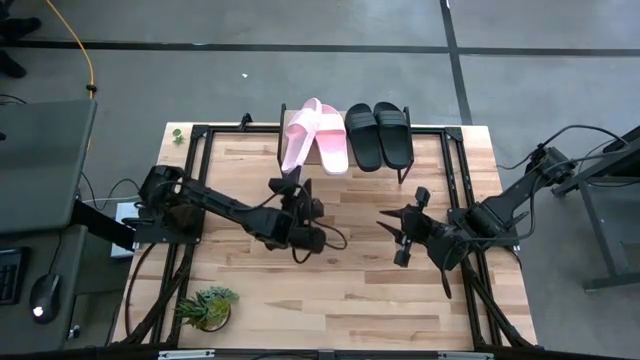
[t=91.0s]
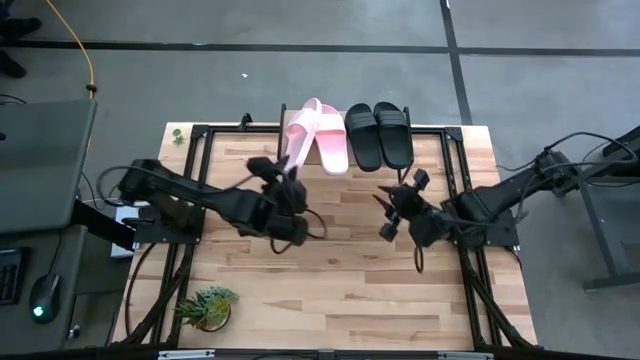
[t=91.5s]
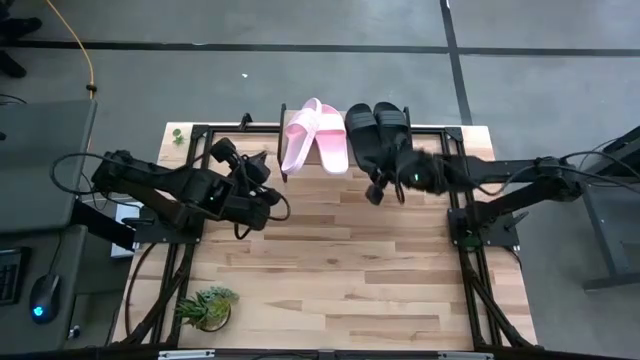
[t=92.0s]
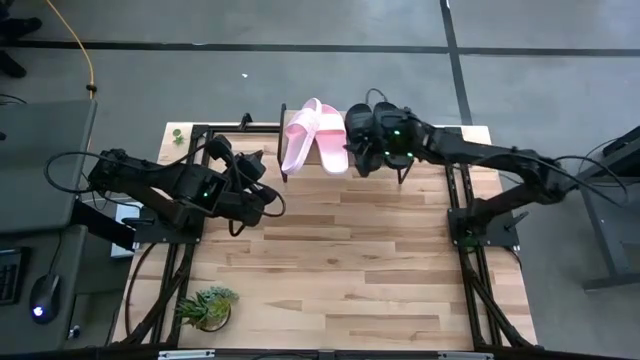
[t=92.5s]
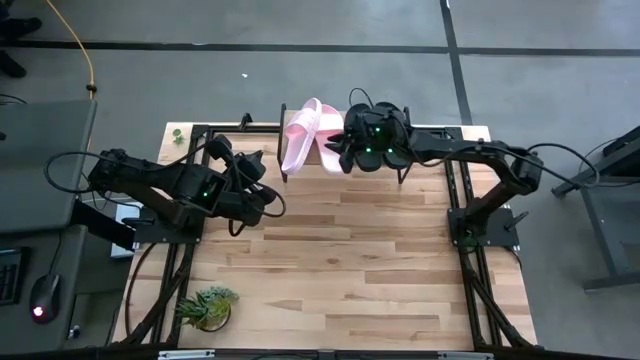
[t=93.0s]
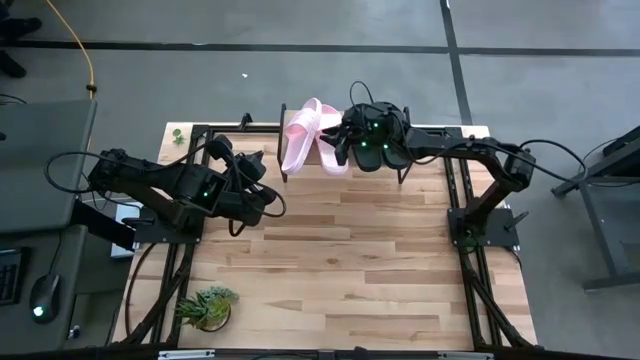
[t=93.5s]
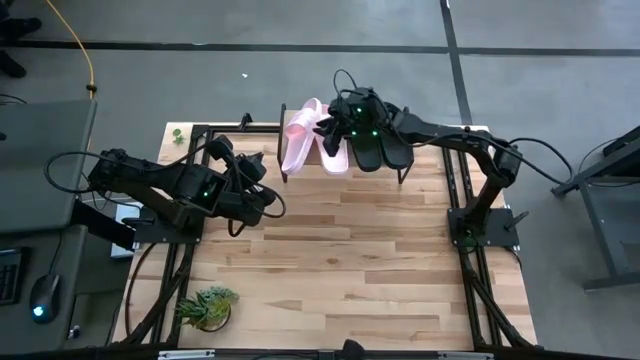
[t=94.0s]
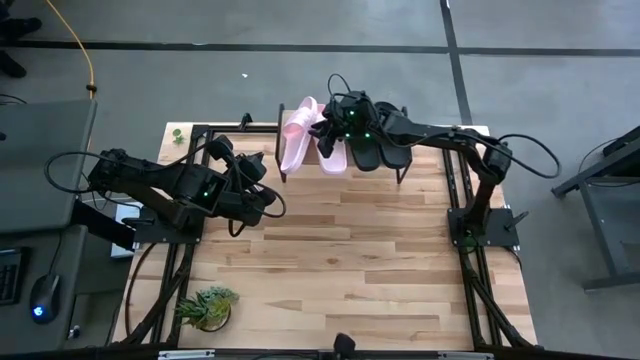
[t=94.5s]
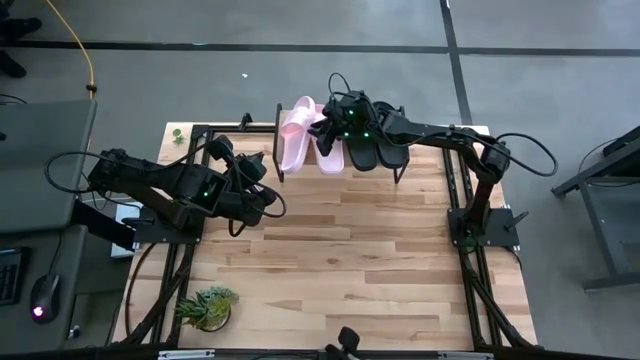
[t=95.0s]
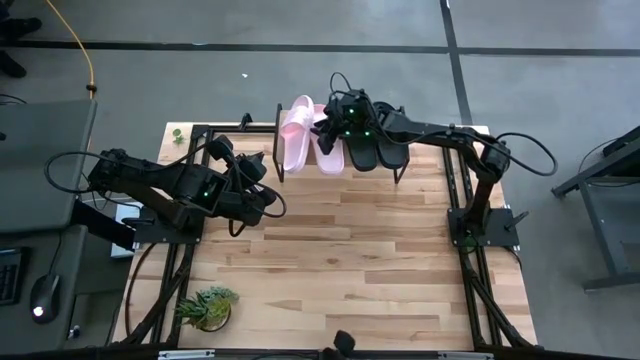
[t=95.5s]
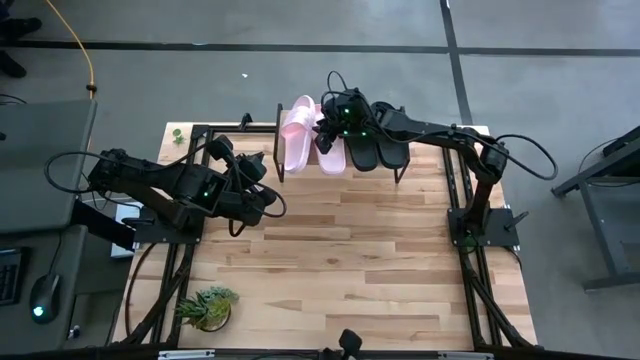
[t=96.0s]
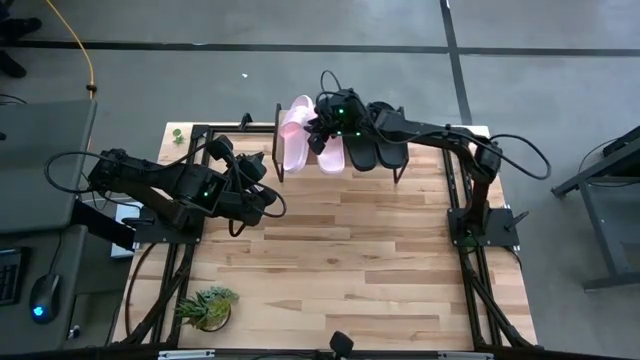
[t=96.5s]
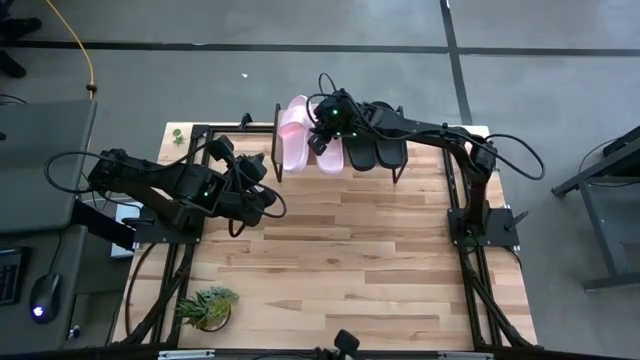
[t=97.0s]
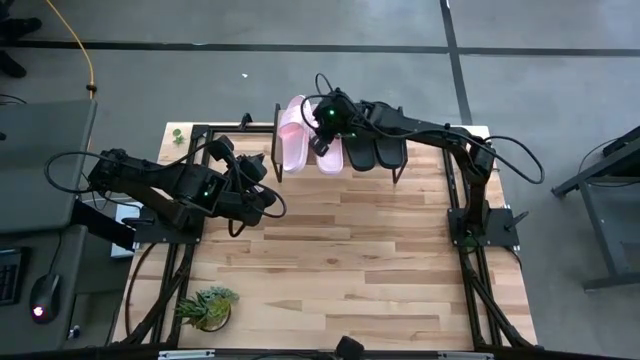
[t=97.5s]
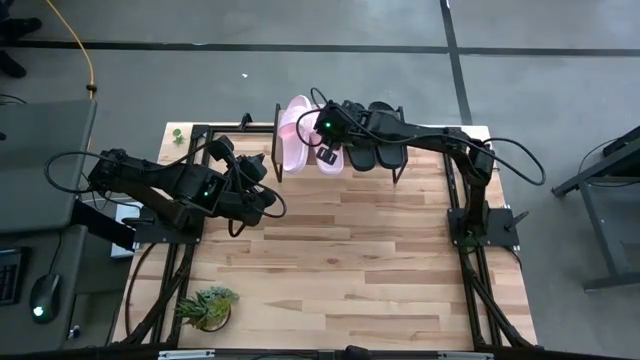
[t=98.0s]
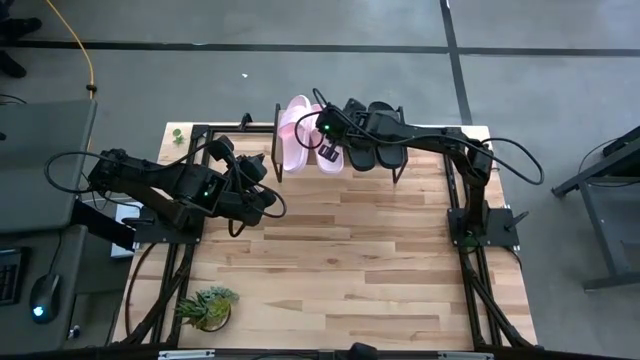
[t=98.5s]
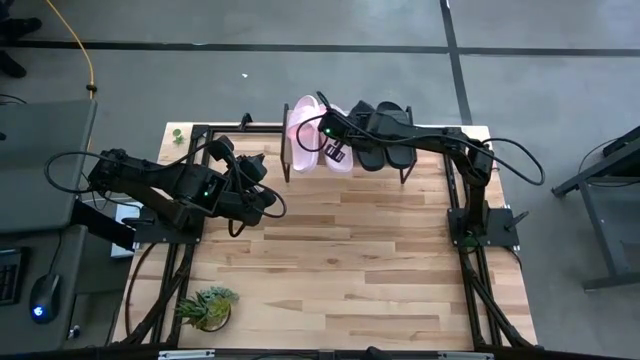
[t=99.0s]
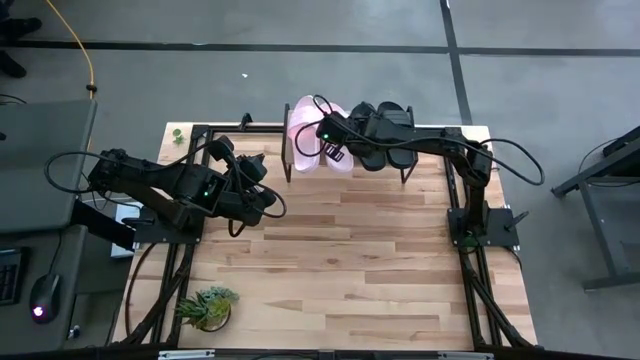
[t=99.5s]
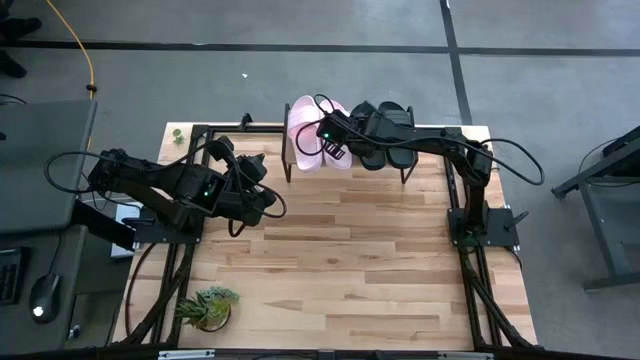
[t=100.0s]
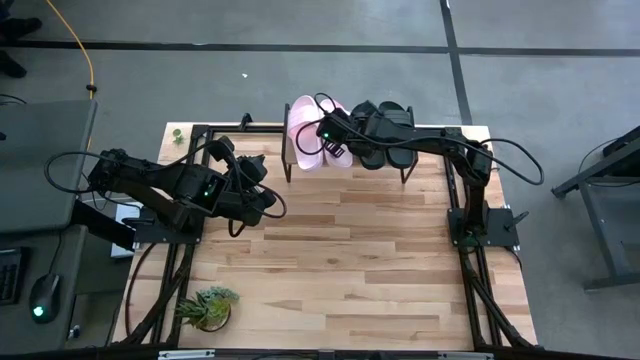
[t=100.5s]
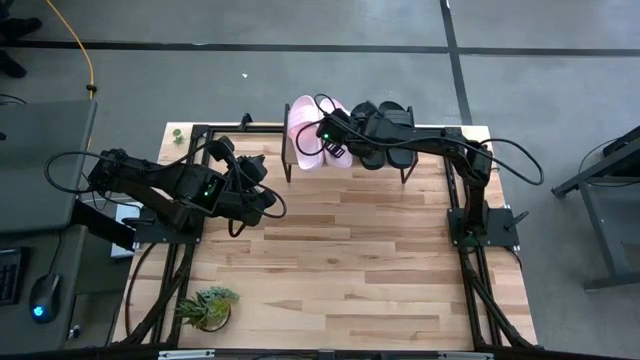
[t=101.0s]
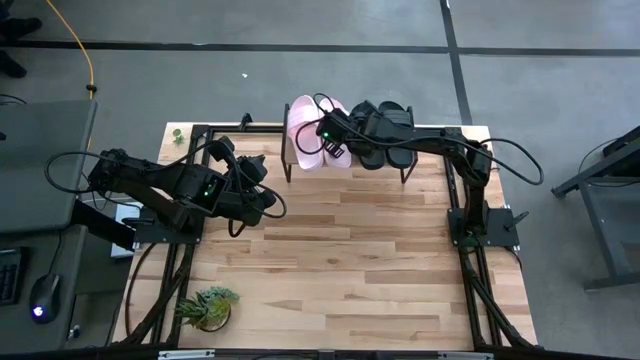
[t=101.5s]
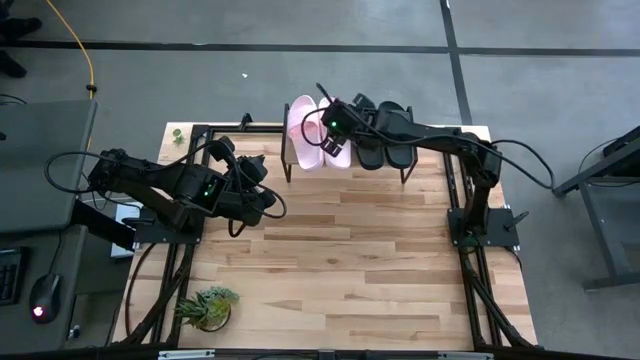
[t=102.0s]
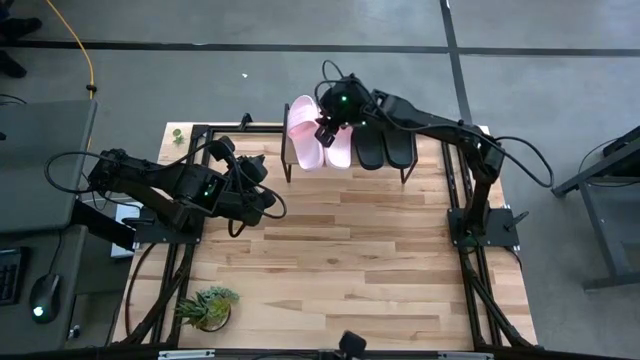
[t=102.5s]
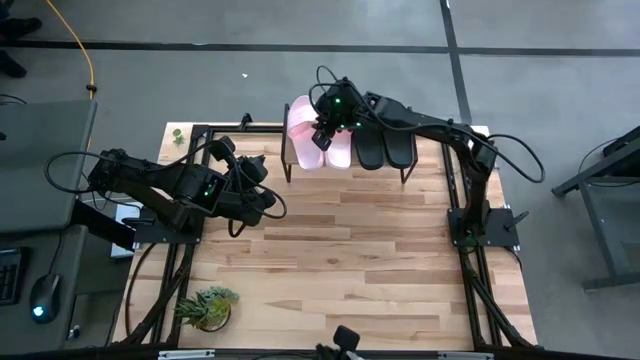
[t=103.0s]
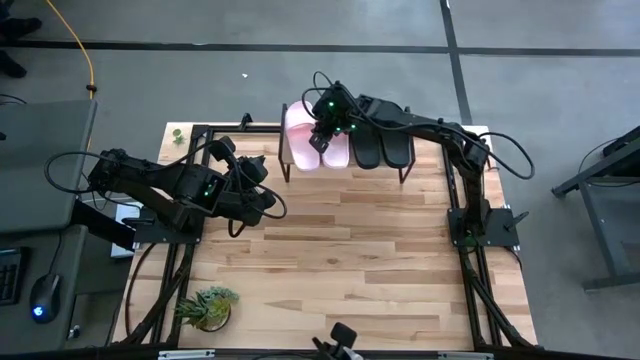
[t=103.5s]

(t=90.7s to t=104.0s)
Task: Pick and place slides into the shelf
Adjust the pink slides on the shelf

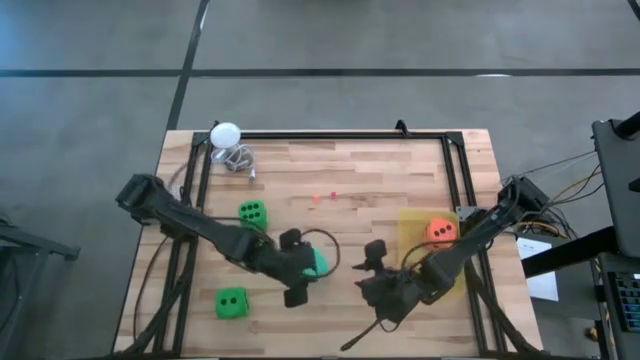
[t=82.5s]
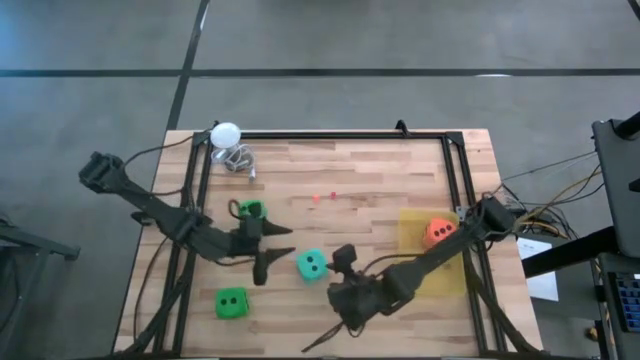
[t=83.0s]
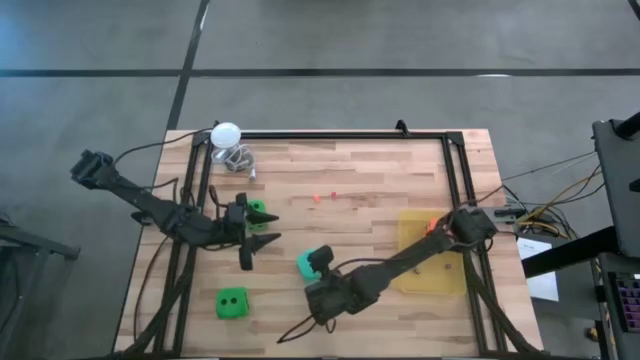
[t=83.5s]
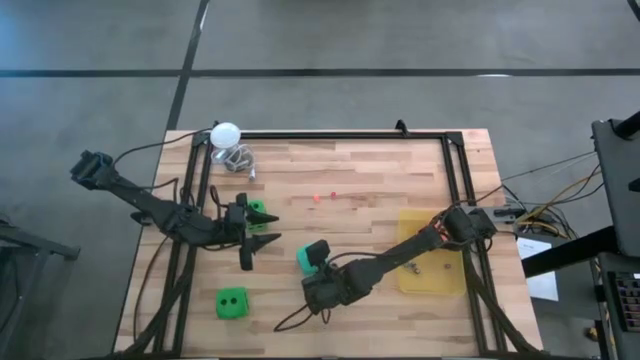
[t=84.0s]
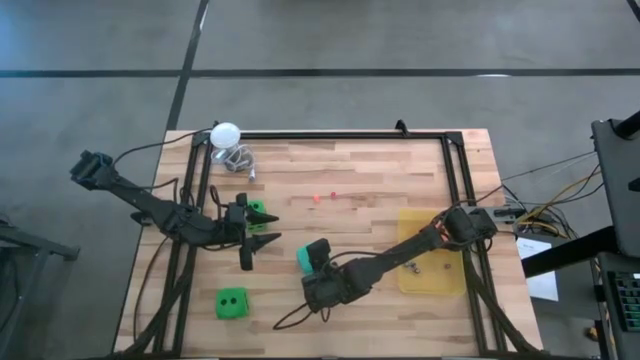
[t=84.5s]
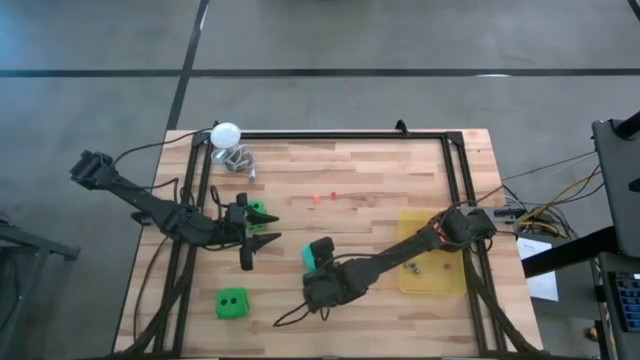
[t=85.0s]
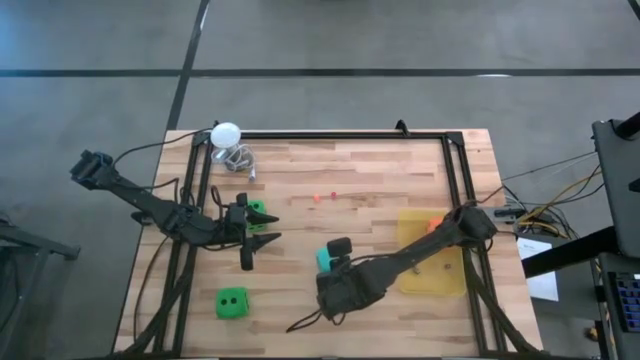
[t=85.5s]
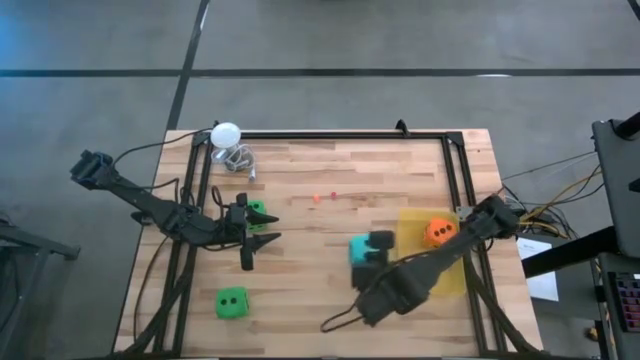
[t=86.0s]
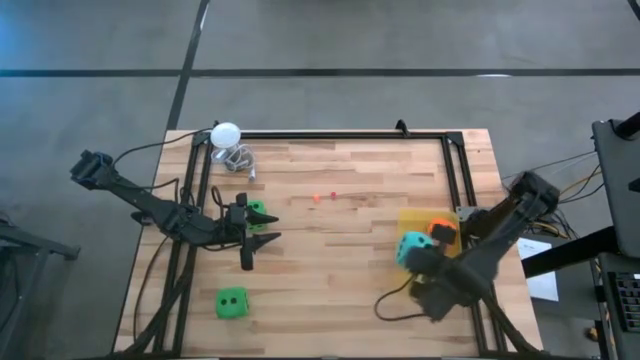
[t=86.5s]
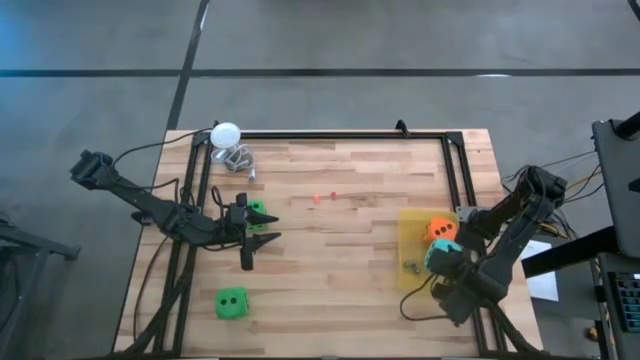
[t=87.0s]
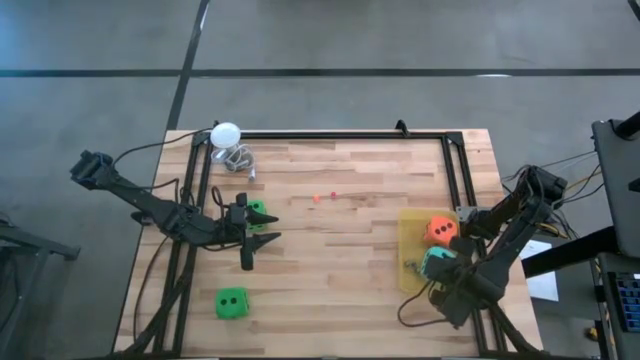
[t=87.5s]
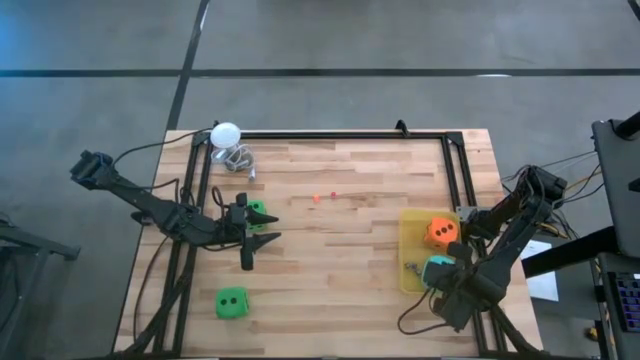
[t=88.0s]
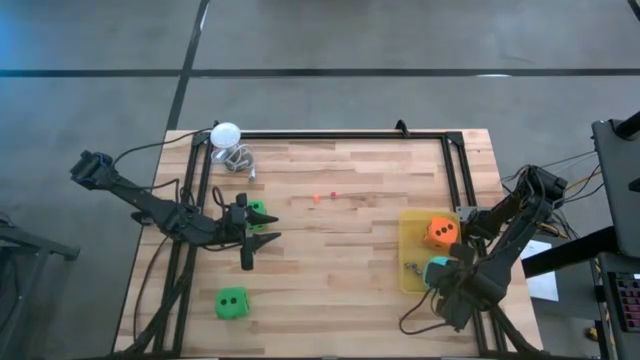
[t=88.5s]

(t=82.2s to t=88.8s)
Task: Pick & Place Dice
Put the large blue dice into the yellow bin
